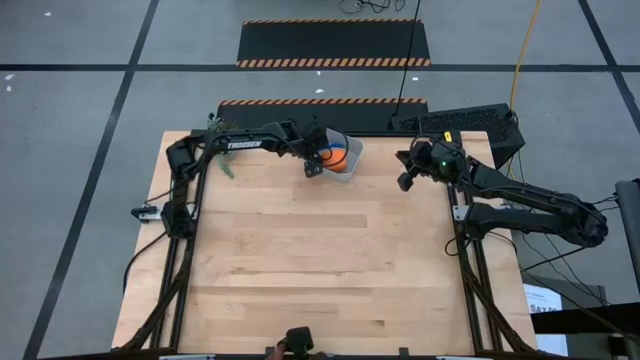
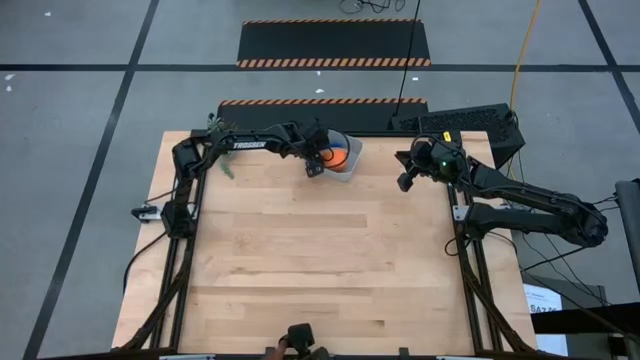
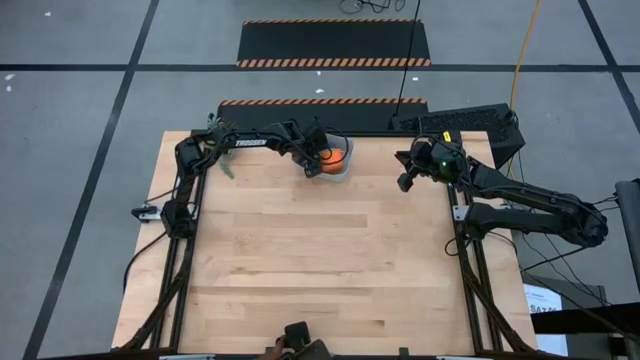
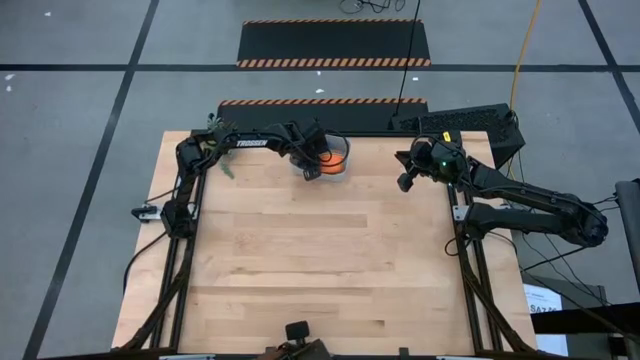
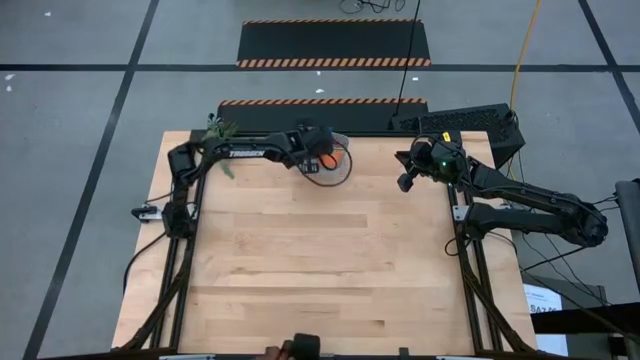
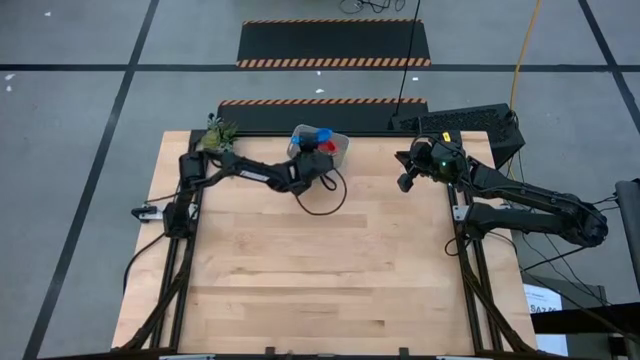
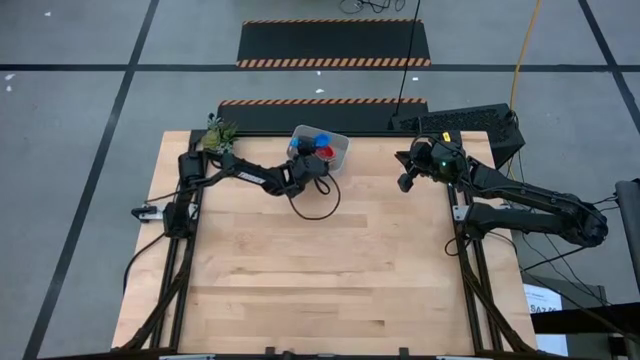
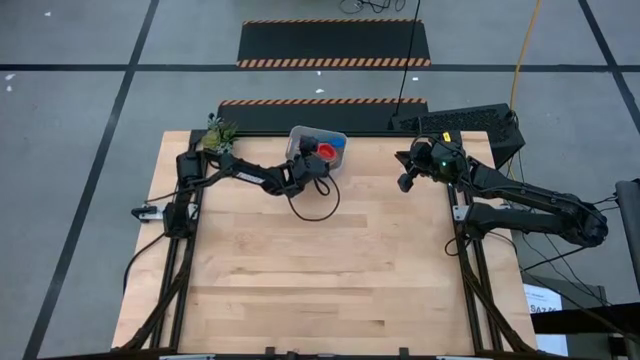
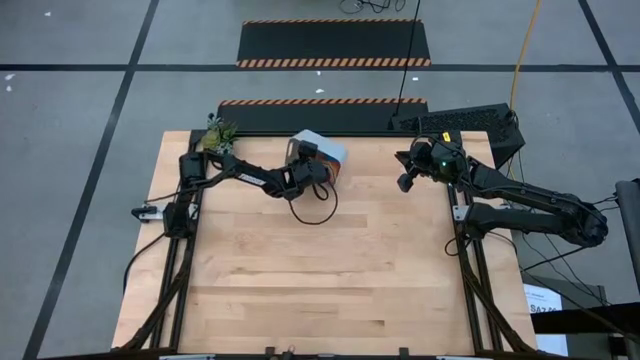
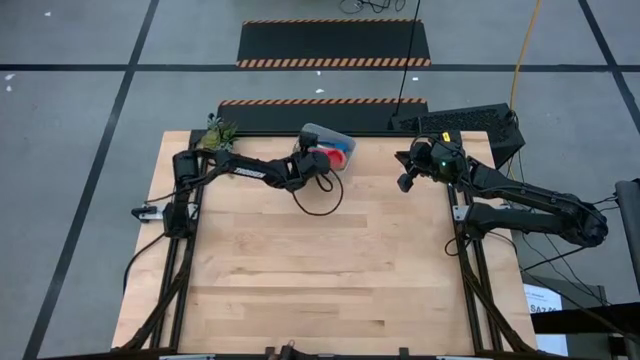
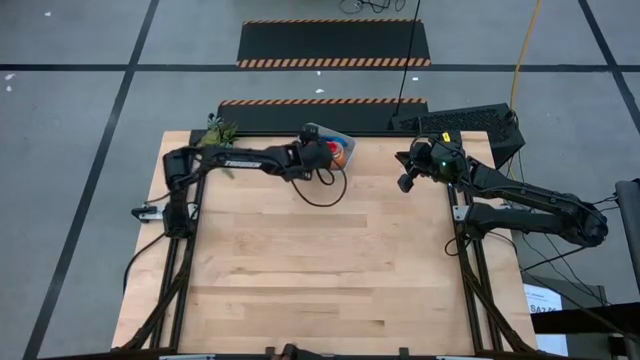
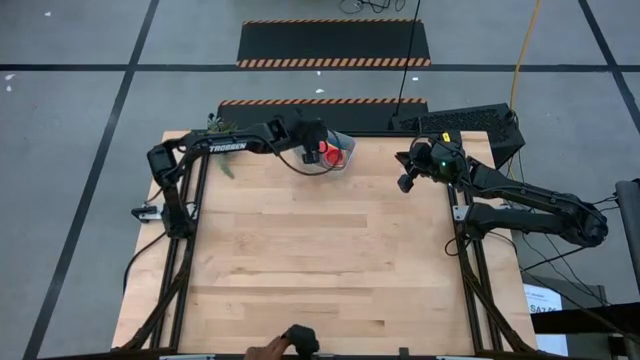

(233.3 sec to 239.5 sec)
Task: Nest measuring cups in basket
Put the stack of measuring cups into the gray bin

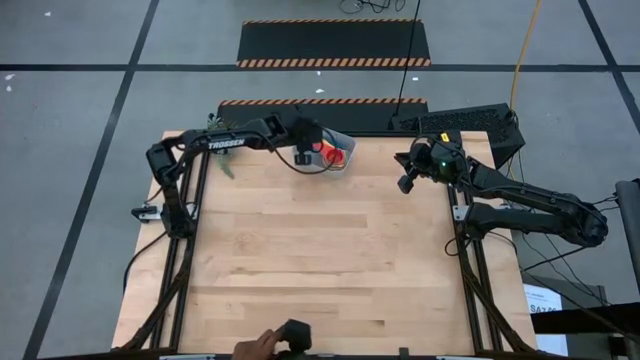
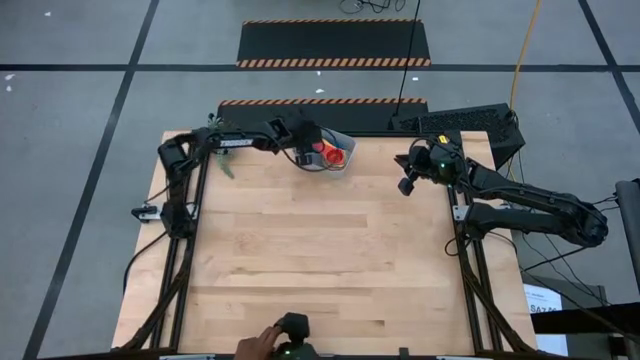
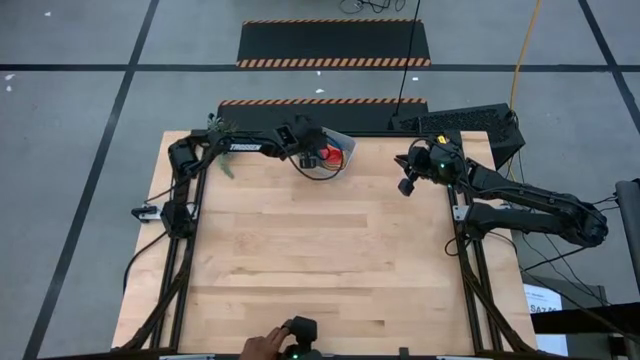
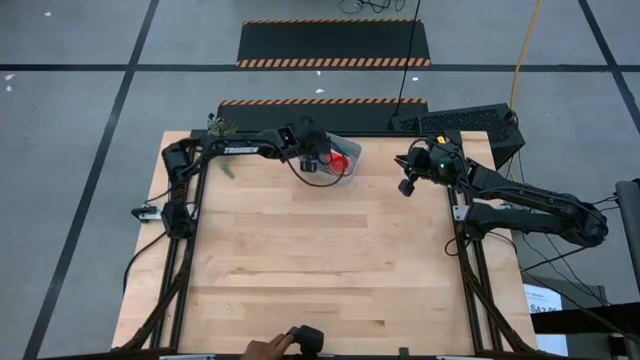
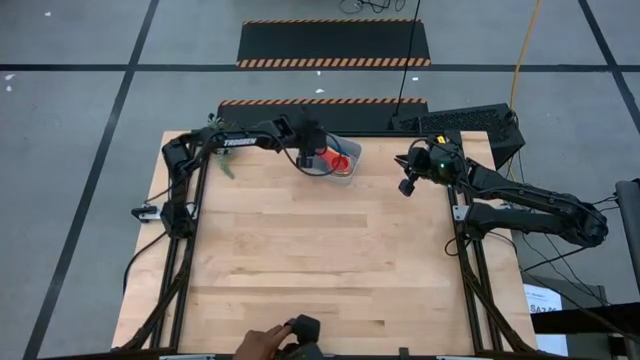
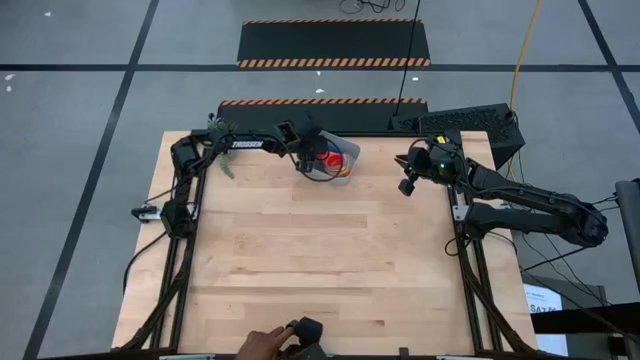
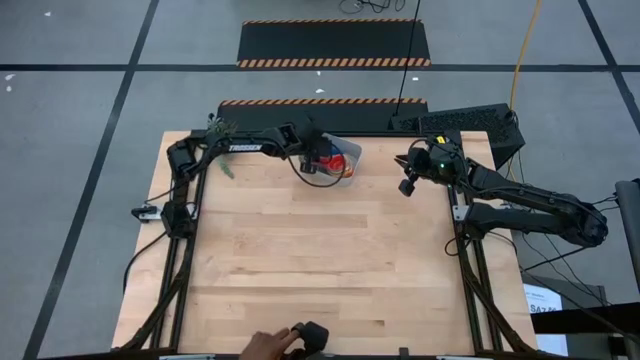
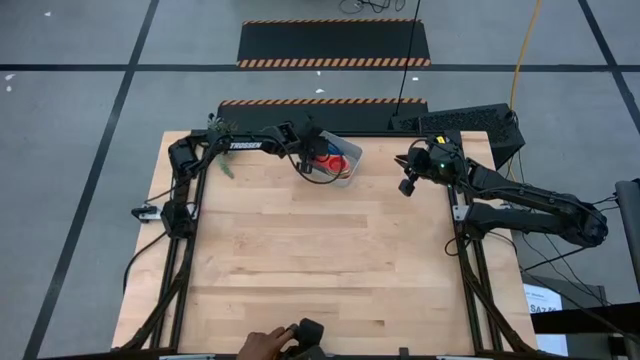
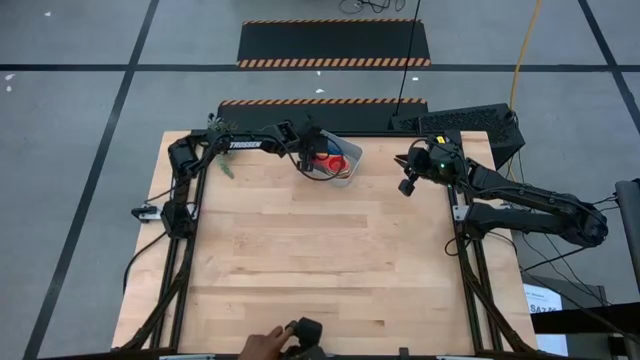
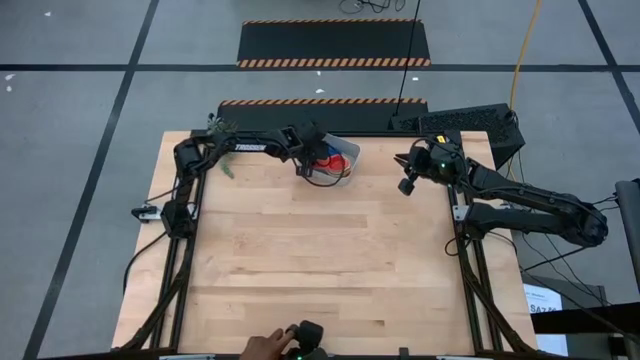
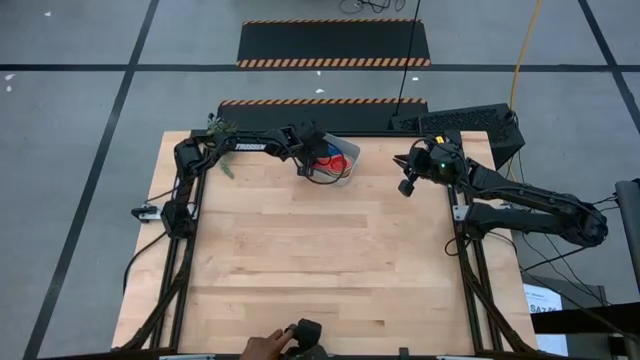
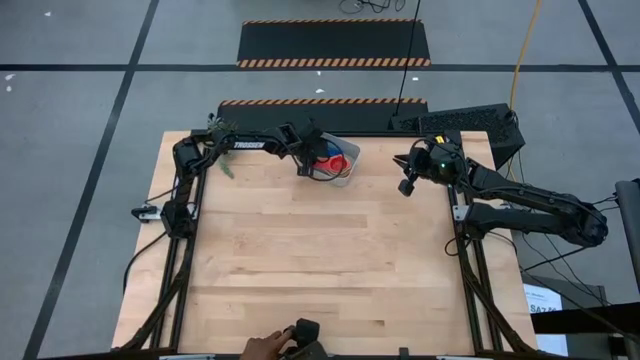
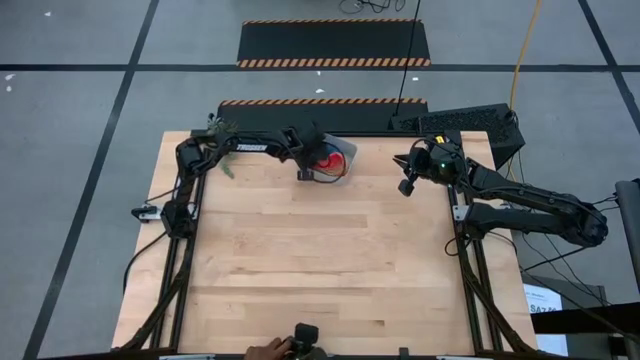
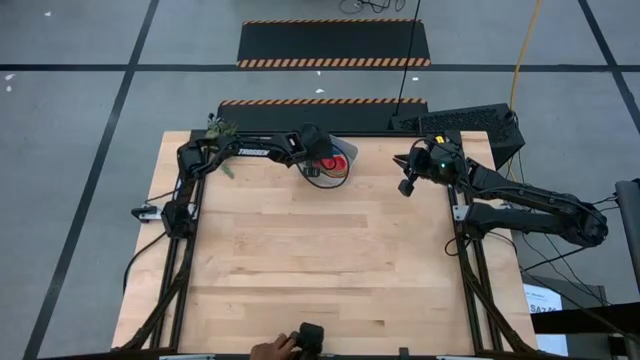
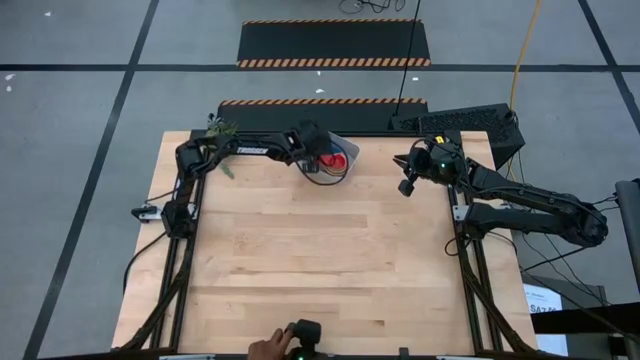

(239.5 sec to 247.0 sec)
Stack the blue measuring cup into the red measuring cup in the gray bin

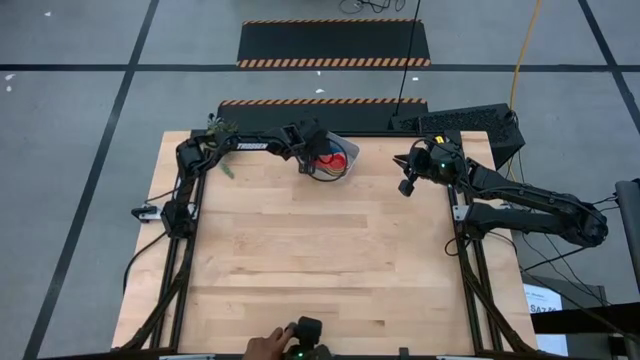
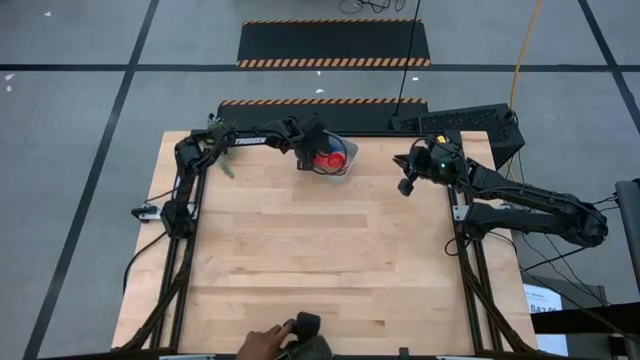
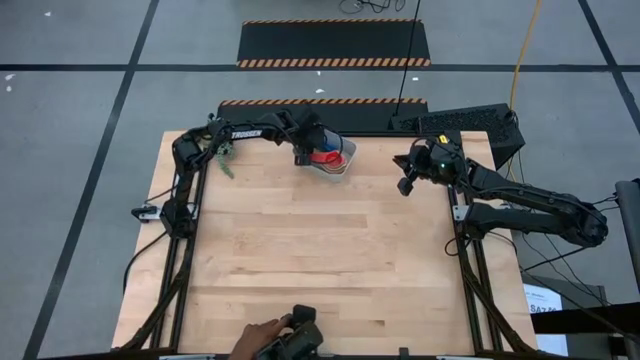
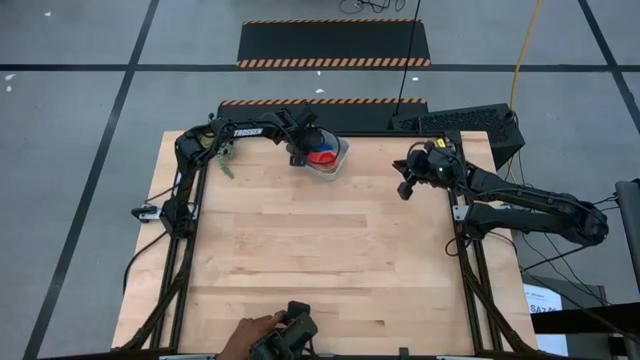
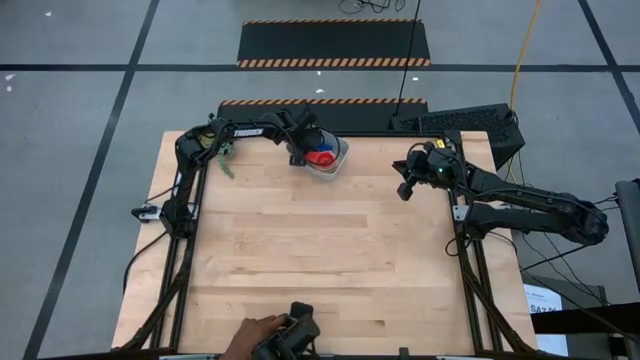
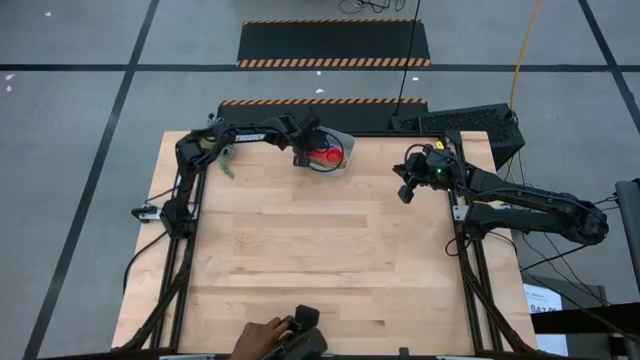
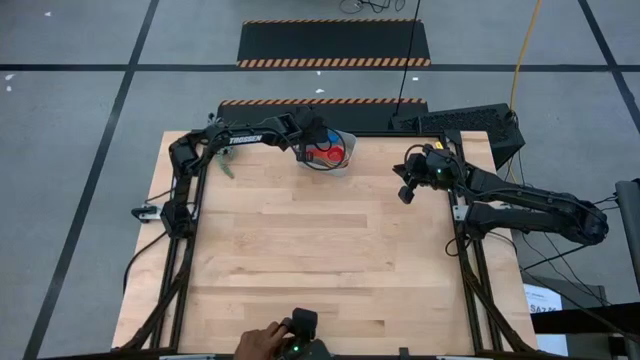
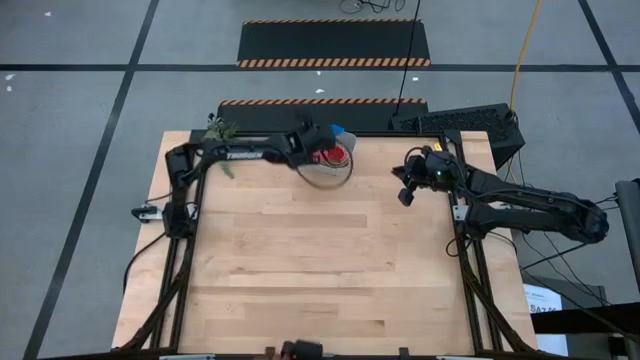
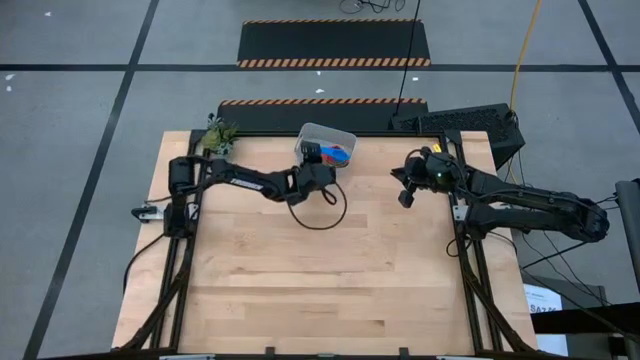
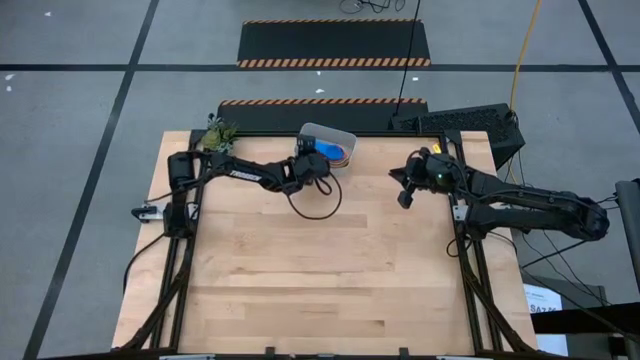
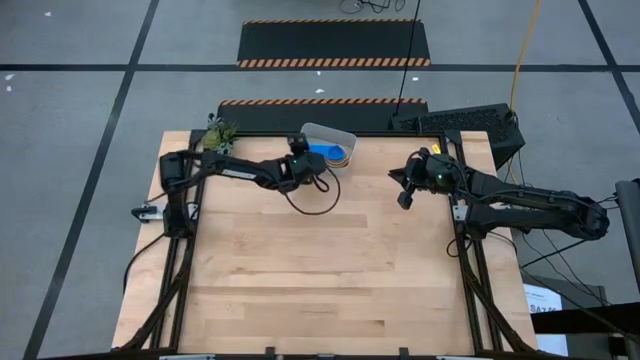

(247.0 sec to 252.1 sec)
Stack the blue measuring cup into the red measuring cup in the gray bin

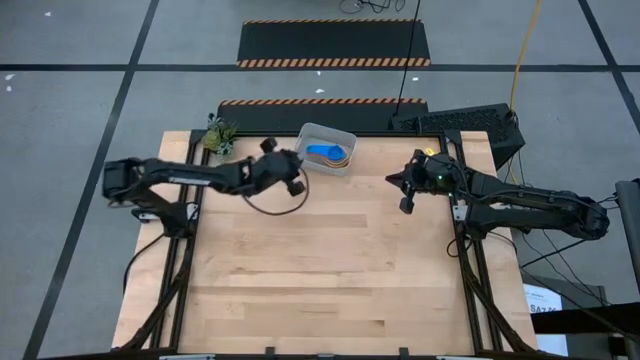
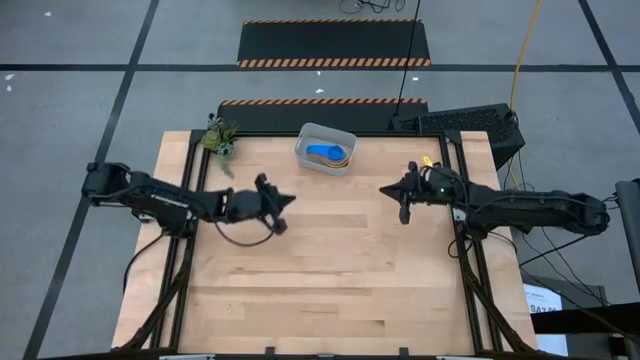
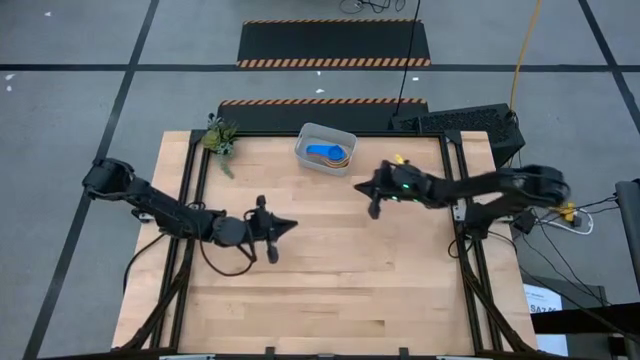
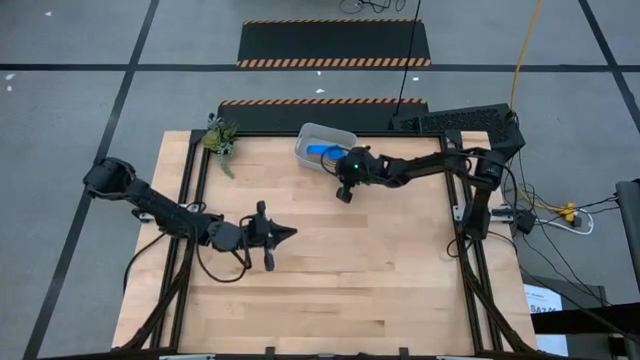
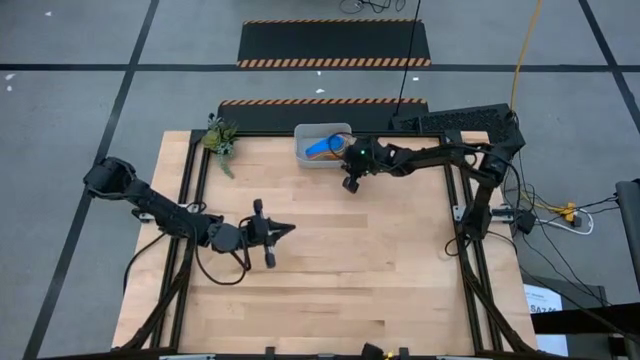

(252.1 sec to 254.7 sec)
Adjust the gray bin
